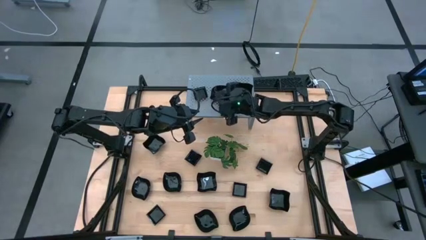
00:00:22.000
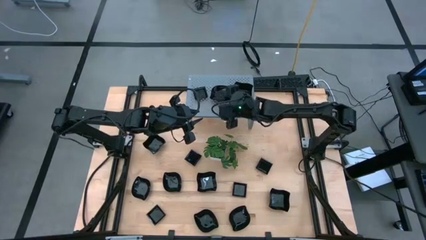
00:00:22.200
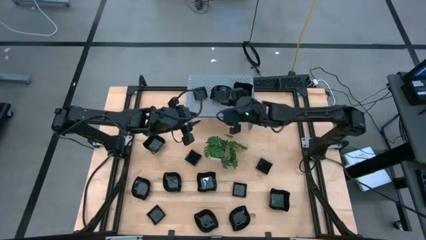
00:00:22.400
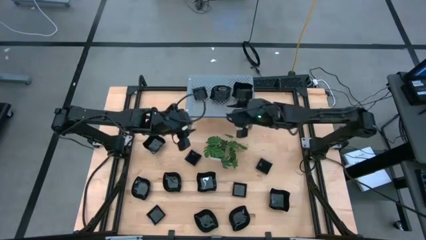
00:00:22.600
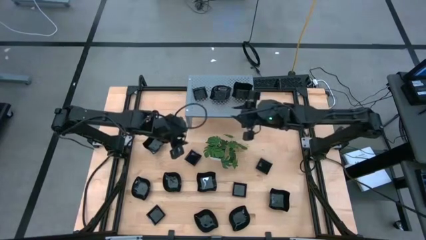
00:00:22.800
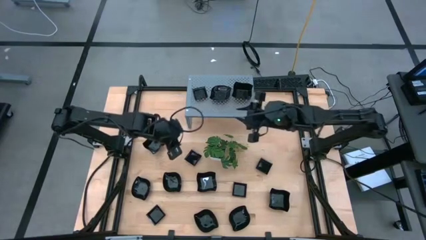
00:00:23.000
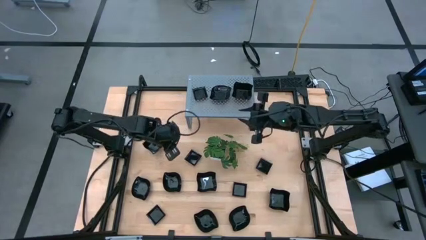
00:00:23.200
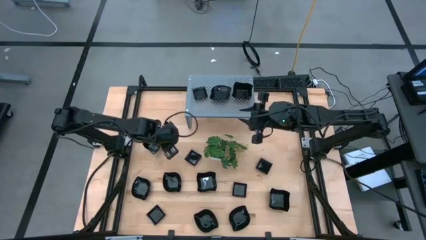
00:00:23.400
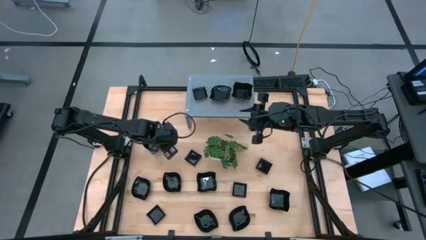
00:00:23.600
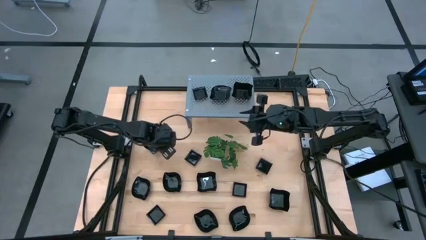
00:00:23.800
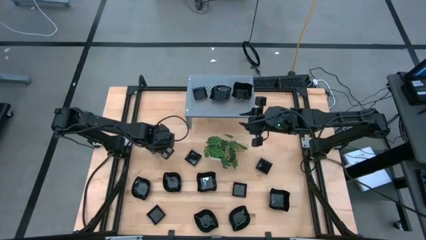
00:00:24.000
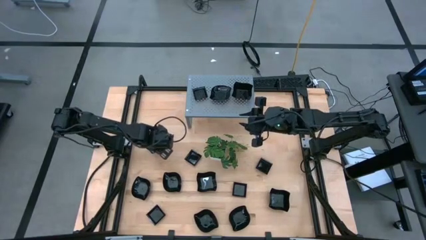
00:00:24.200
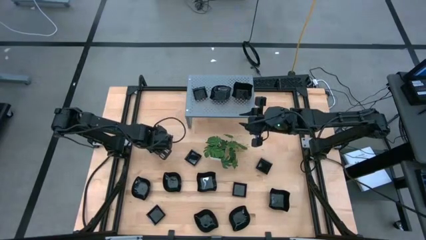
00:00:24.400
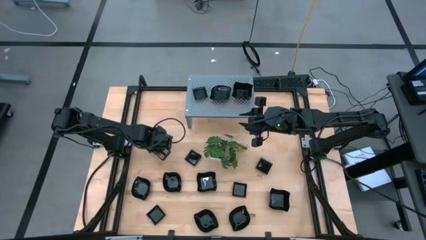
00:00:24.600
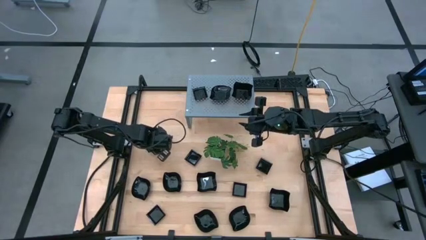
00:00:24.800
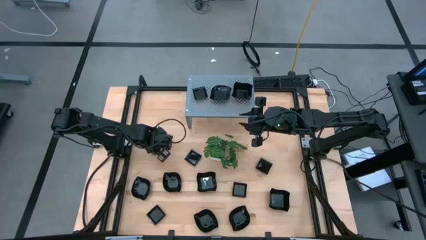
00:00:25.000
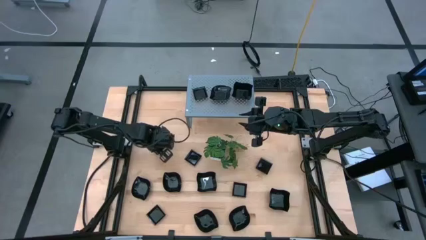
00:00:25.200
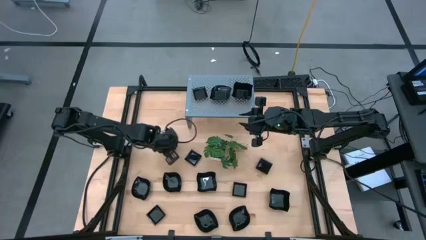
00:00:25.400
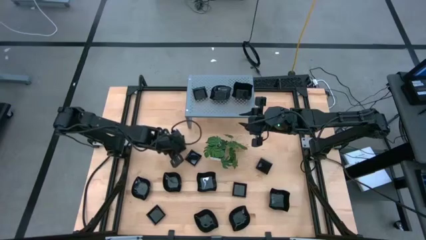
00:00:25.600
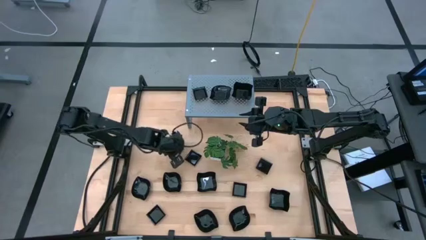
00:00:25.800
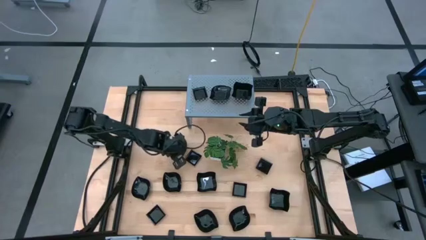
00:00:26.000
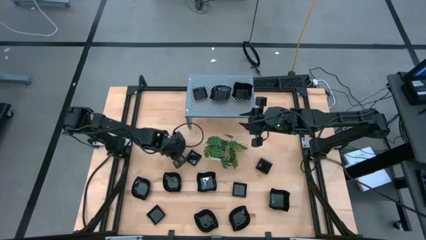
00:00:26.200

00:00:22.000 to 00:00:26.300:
Task: Pick & Place Mini shaped plates
Stack the square black bowl on top of the other square black bowl on the shelf

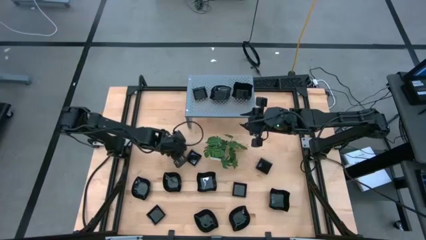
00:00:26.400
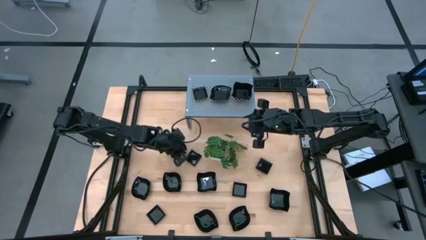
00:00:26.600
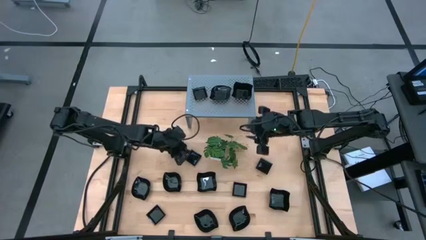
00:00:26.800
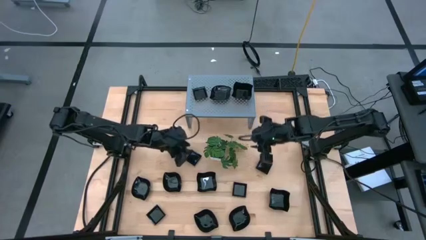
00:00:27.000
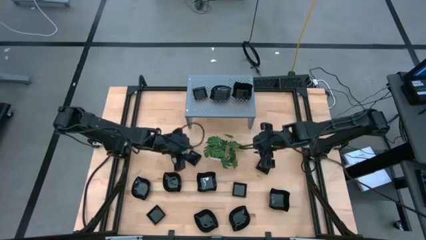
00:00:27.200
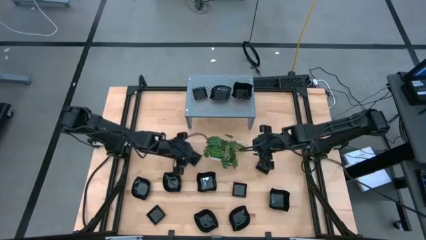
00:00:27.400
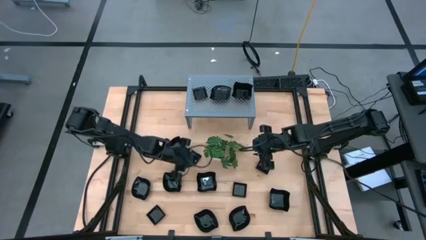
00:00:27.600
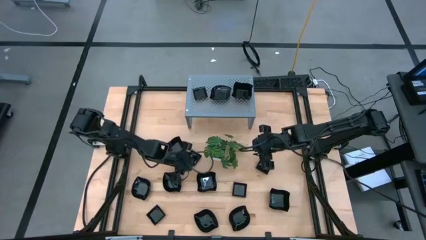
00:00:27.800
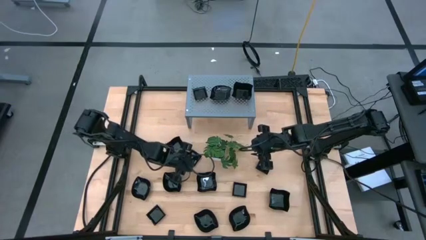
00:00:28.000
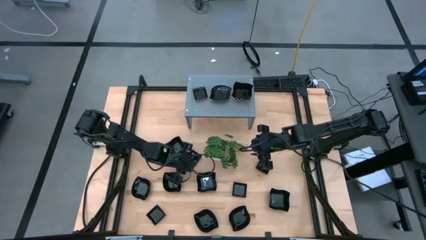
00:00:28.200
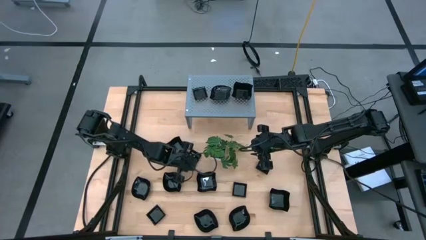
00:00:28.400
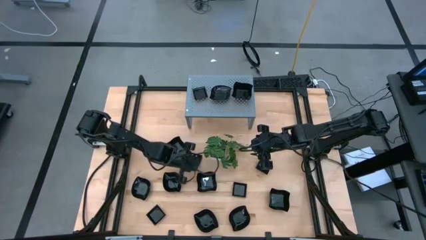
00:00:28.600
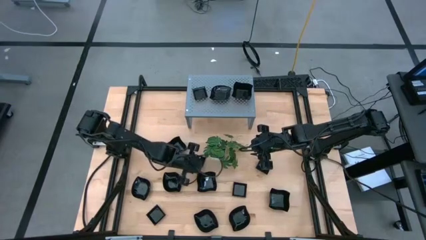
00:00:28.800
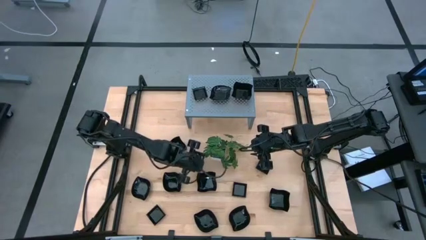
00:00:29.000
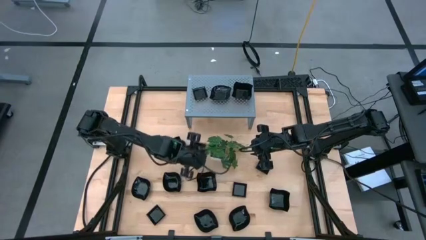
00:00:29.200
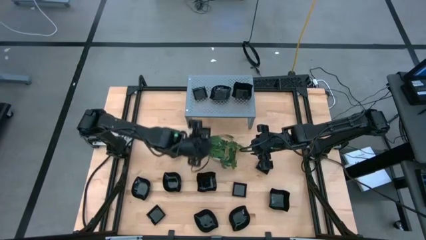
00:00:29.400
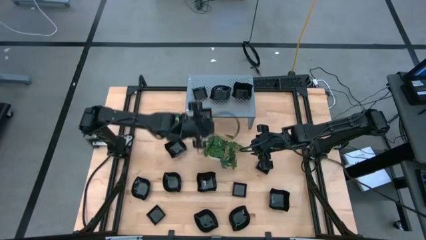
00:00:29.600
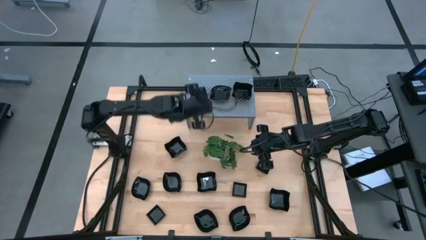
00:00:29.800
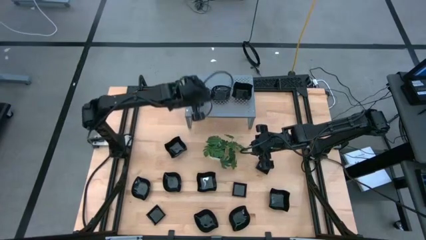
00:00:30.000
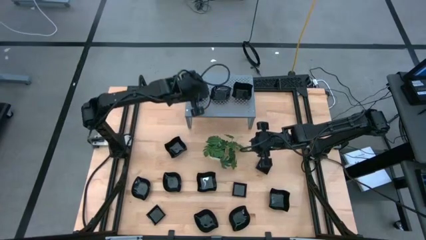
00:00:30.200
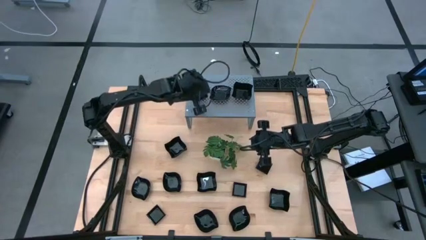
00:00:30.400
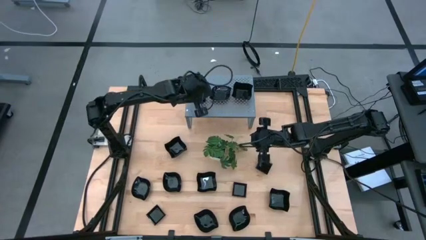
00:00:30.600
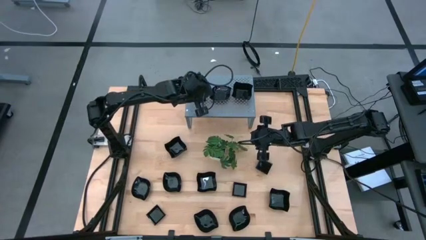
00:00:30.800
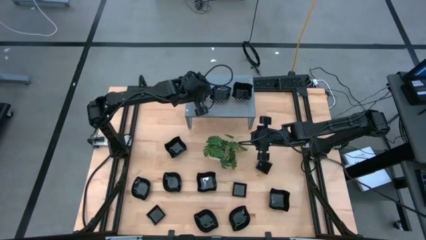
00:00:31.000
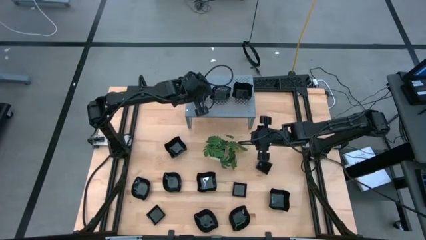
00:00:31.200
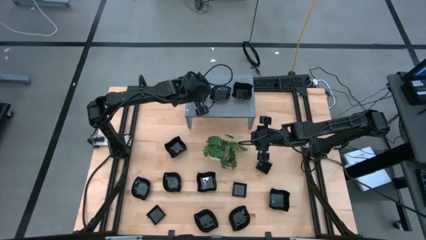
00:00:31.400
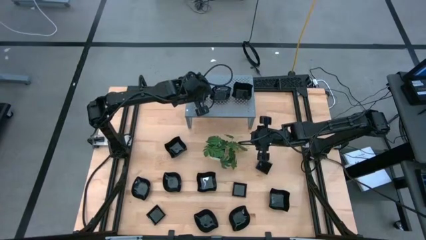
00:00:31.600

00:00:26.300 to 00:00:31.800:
Stack the square black bowl on top of the other square black bowl on the shelf

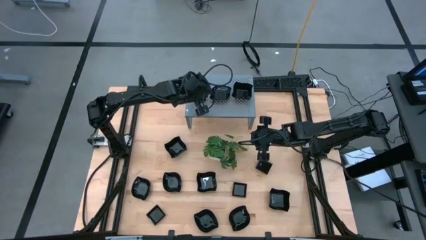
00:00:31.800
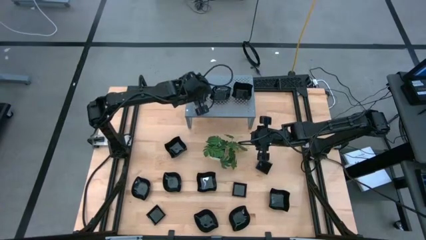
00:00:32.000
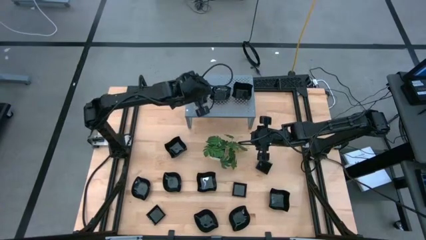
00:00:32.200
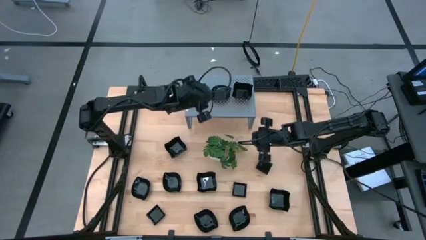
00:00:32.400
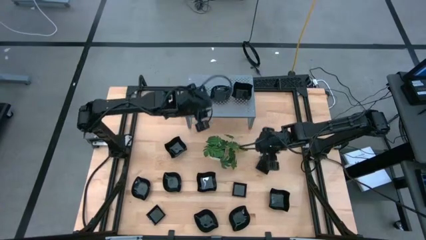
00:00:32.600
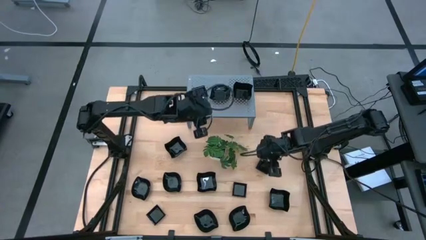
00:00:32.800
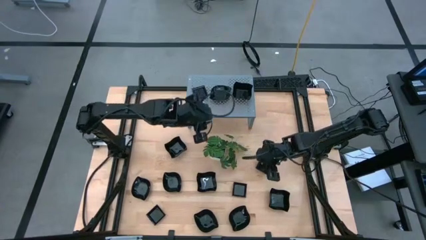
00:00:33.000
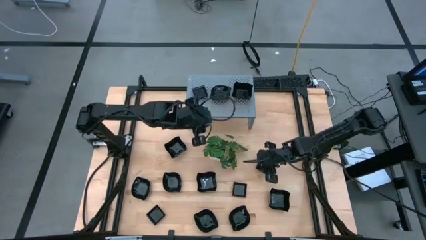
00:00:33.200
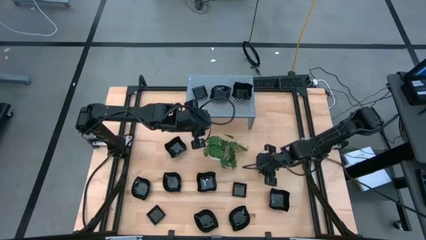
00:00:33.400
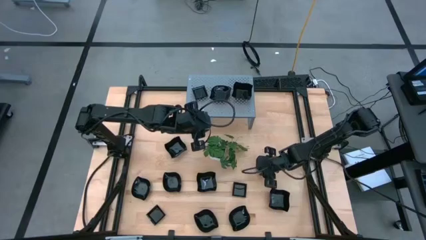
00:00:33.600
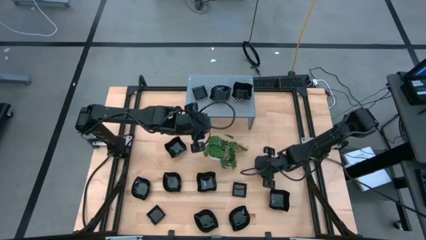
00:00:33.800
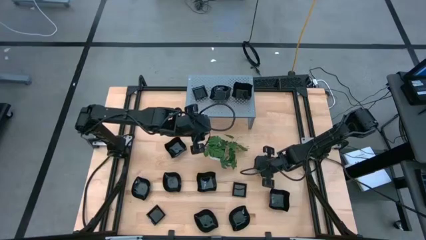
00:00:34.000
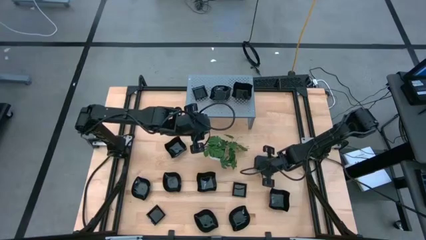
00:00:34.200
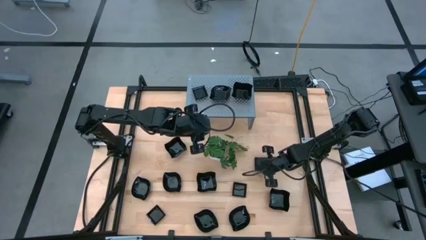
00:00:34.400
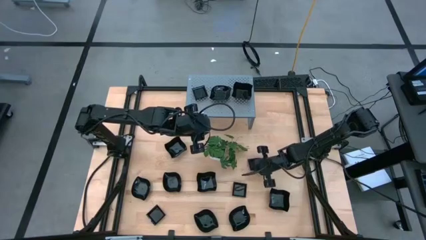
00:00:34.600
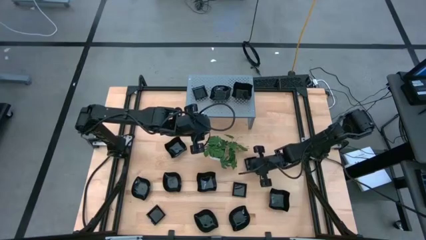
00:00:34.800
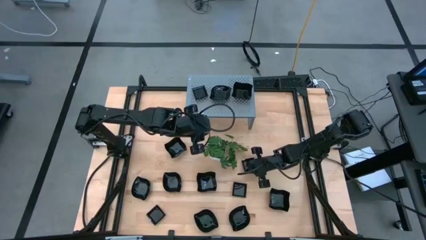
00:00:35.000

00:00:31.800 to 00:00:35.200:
Adjust the square black bowl on the table

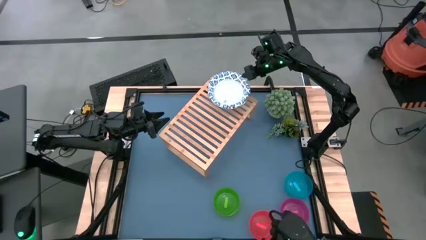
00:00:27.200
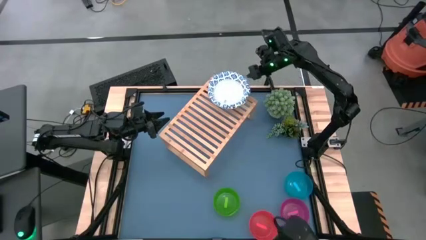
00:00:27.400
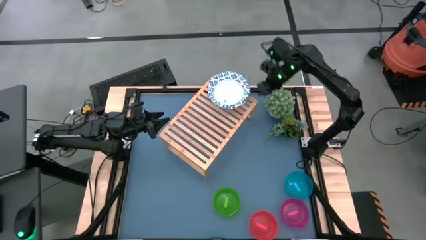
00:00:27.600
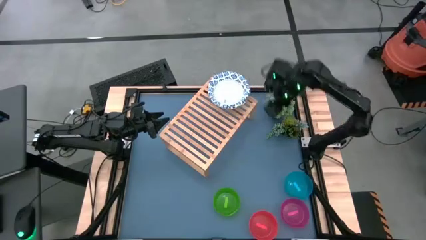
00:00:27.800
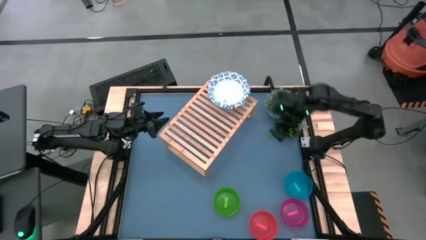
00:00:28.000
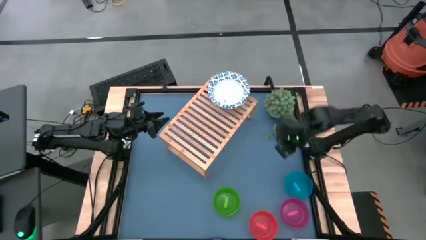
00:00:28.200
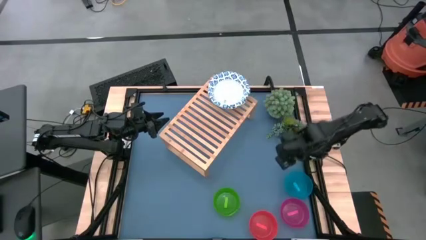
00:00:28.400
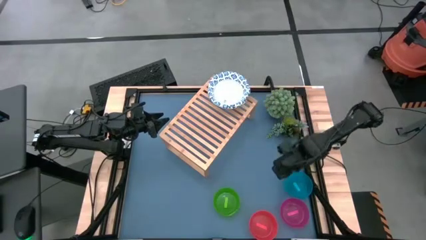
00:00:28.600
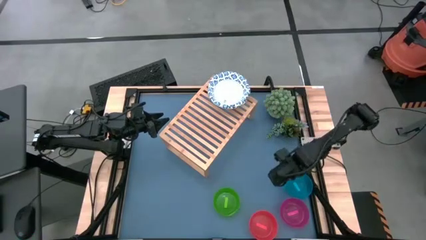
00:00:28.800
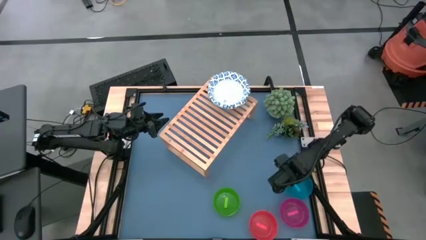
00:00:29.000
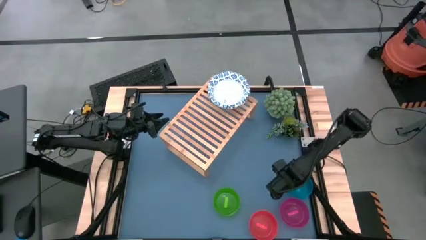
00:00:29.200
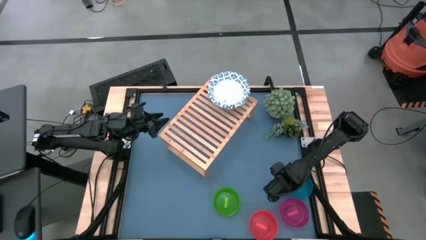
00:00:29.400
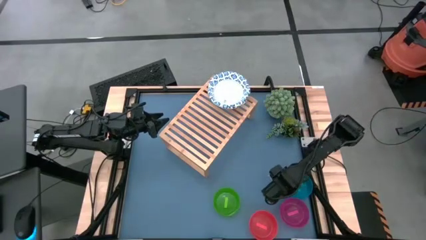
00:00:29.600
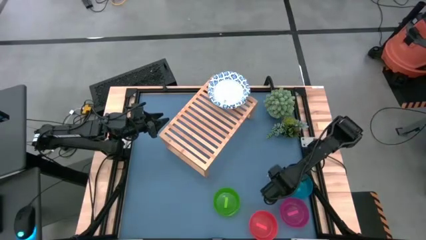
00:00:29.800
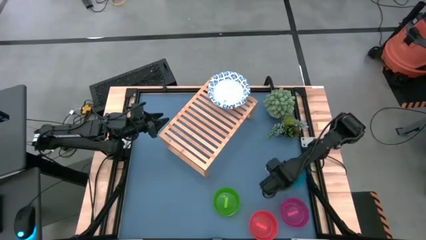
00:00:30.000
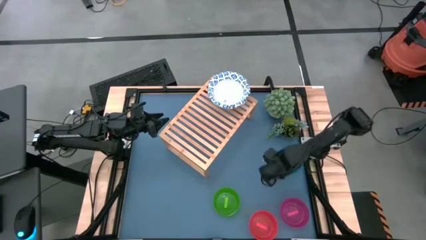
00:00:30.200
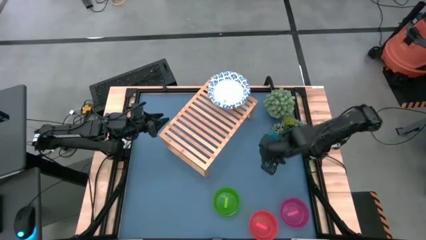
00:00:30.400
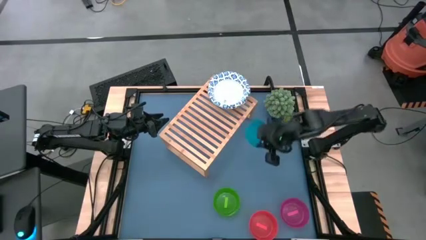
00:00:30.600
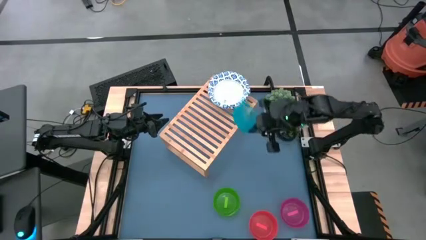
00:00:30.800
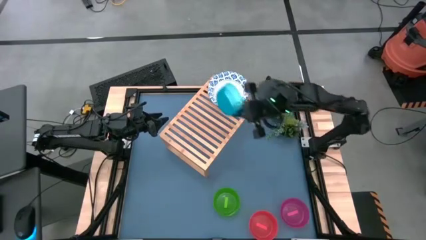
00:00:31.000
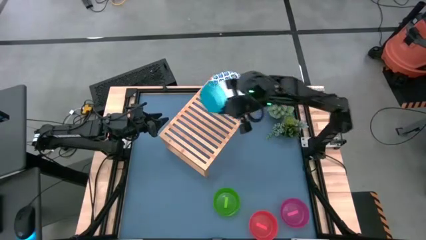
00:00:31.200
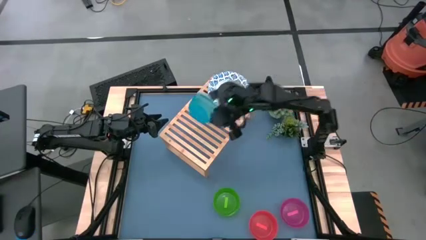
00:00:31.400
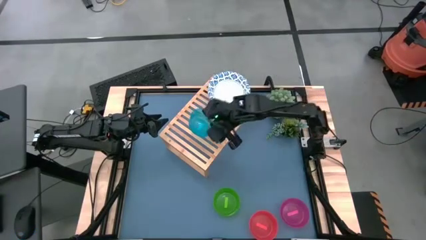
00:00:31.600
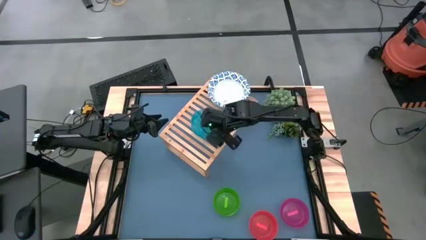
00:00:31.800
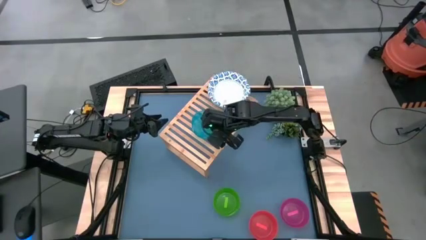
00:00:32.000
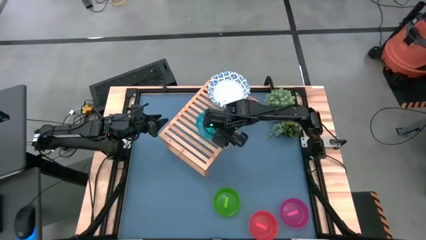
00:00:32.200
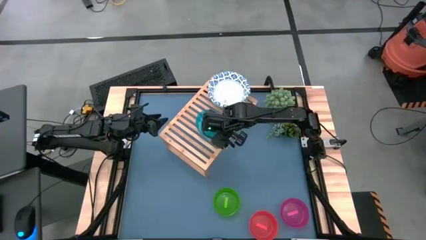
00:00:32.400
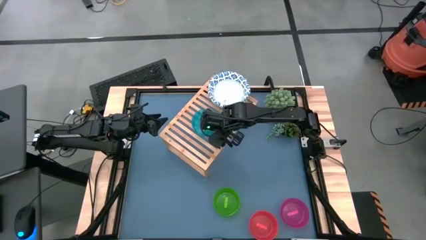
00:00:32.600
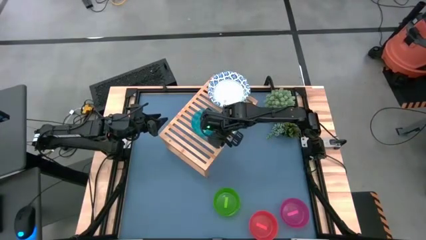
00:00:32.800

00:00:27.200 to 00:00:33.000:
Task: Place and stack bowls onto a shelf
Put the blue bowl on the shelf
